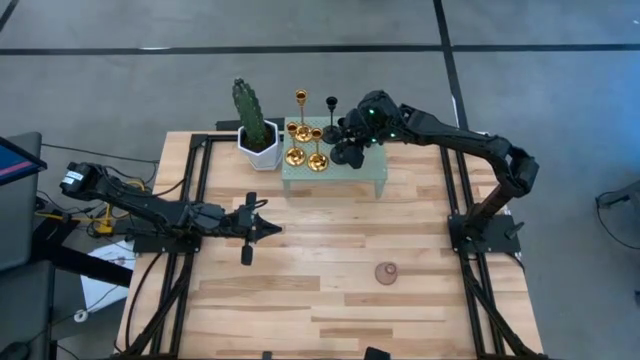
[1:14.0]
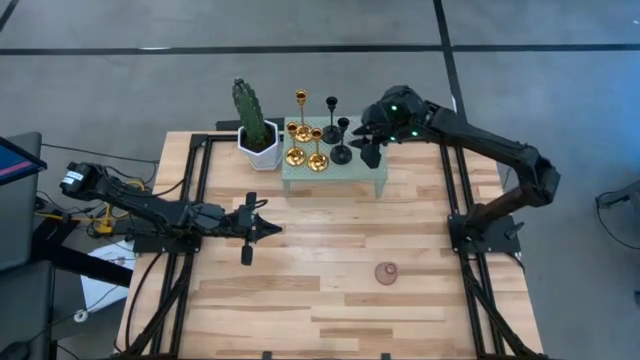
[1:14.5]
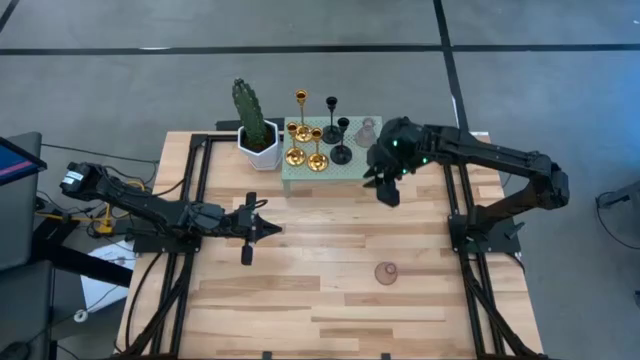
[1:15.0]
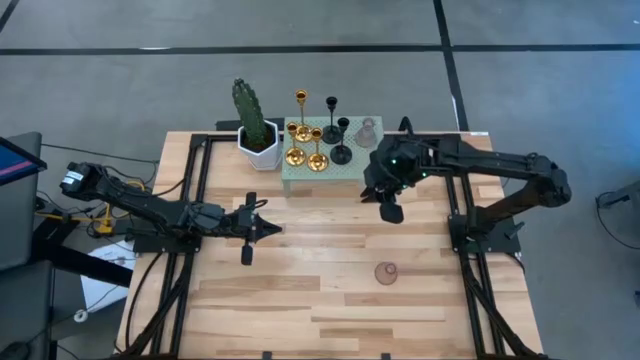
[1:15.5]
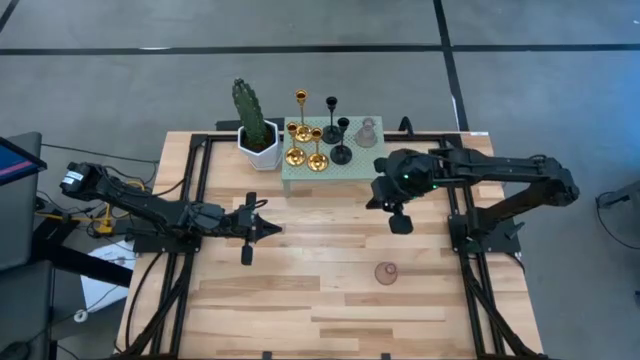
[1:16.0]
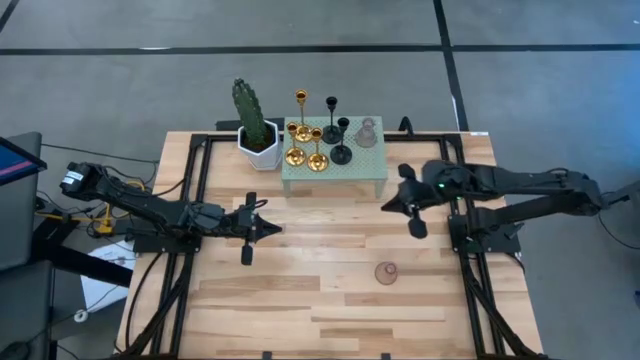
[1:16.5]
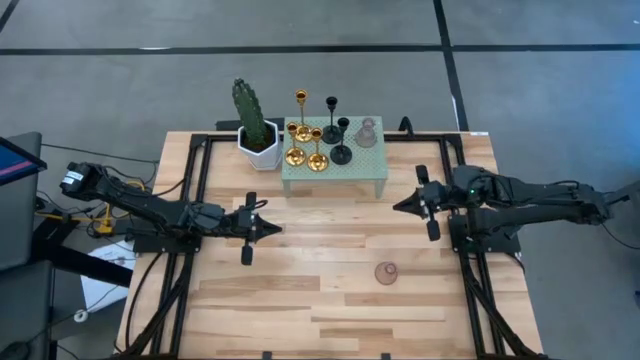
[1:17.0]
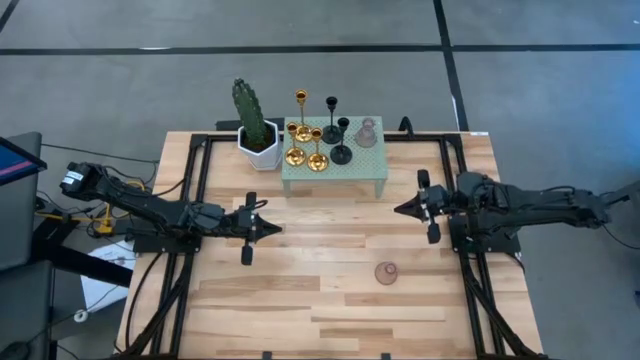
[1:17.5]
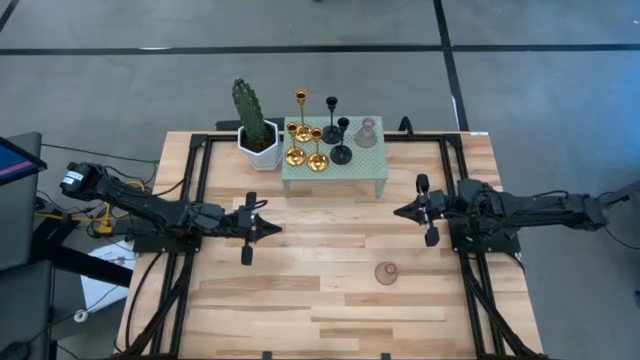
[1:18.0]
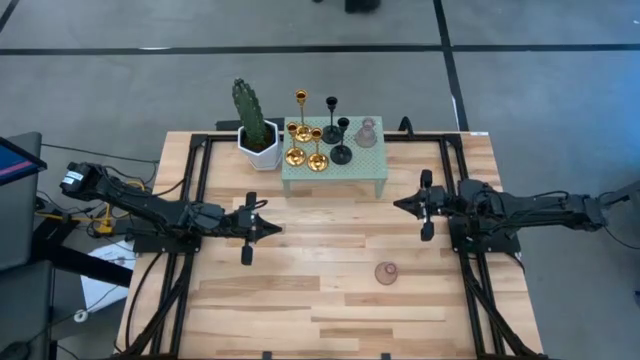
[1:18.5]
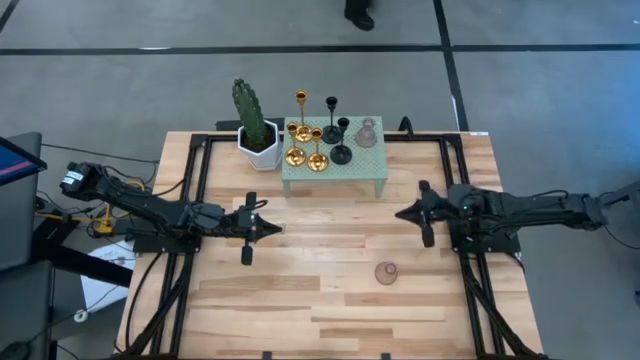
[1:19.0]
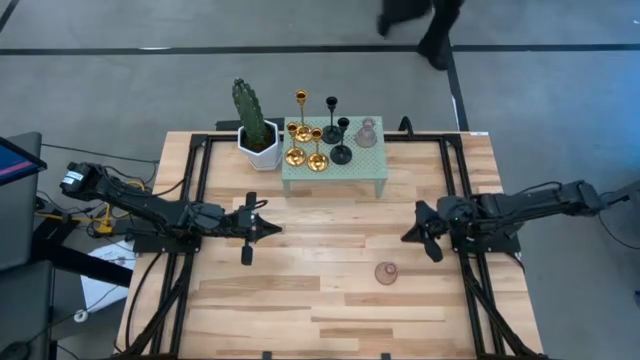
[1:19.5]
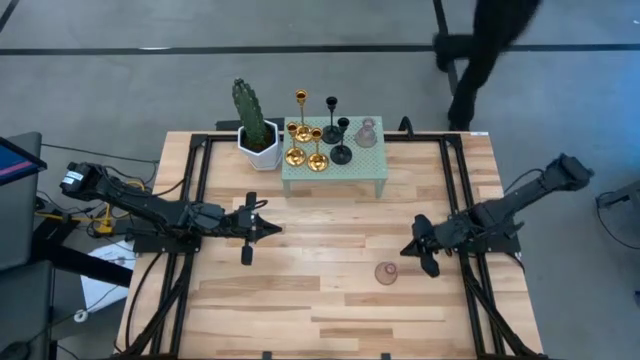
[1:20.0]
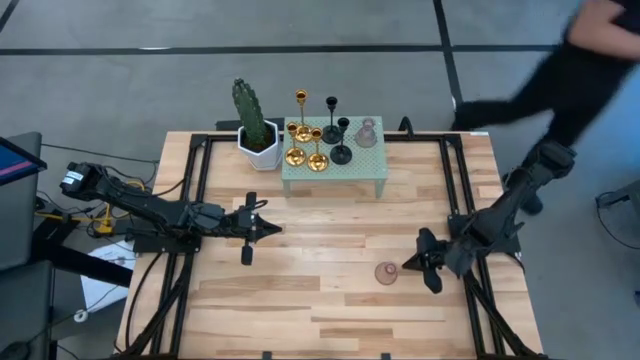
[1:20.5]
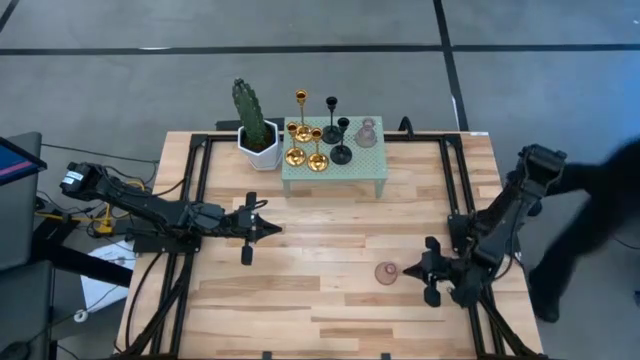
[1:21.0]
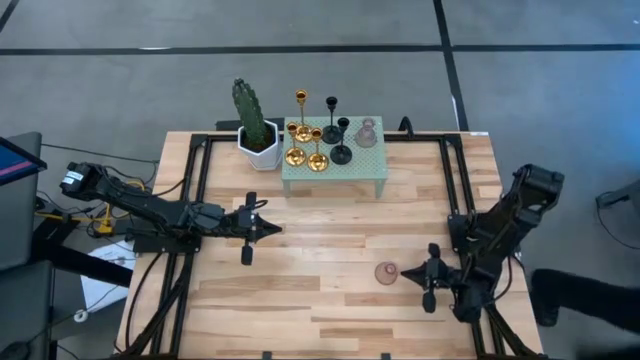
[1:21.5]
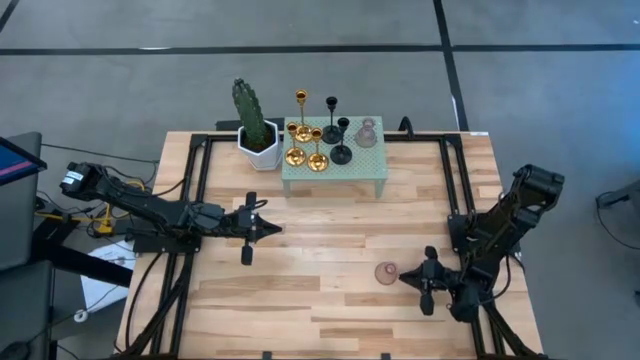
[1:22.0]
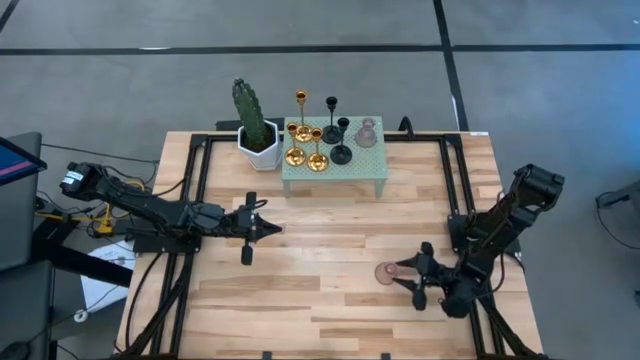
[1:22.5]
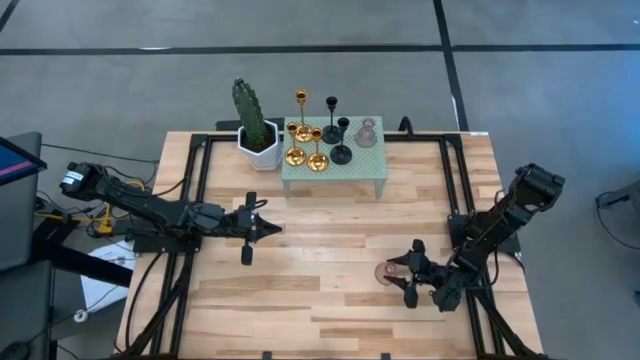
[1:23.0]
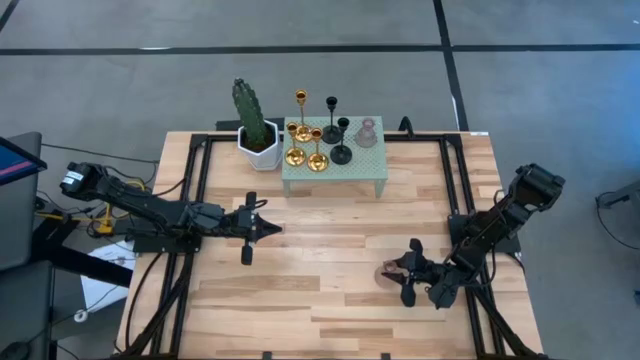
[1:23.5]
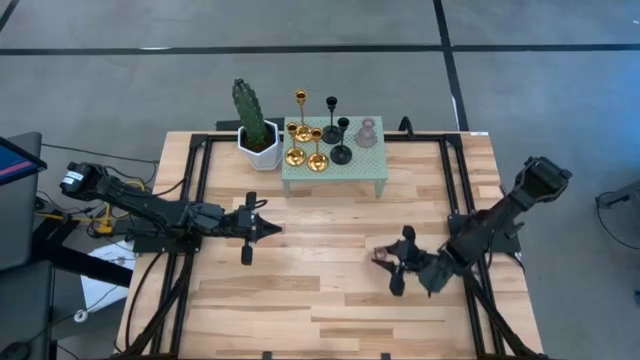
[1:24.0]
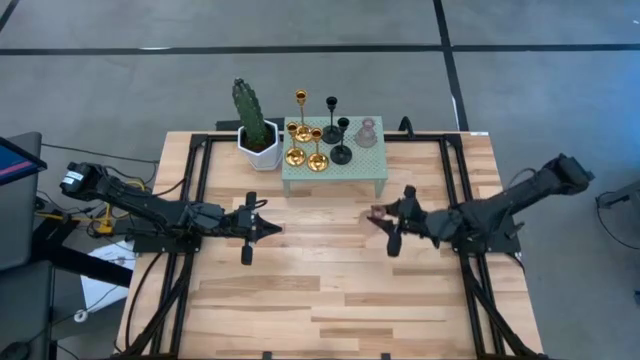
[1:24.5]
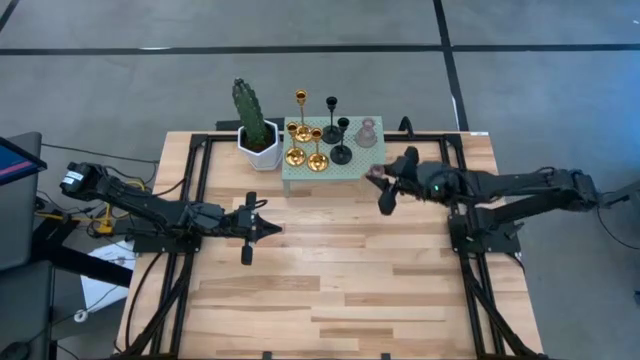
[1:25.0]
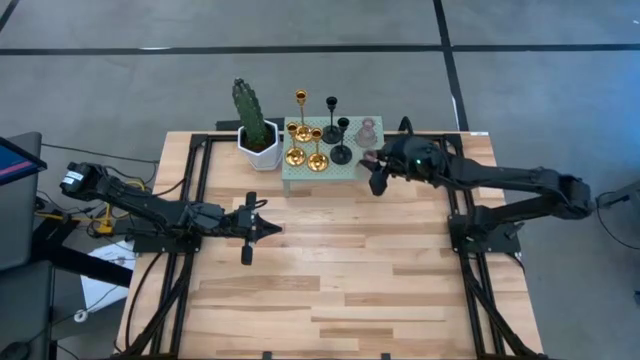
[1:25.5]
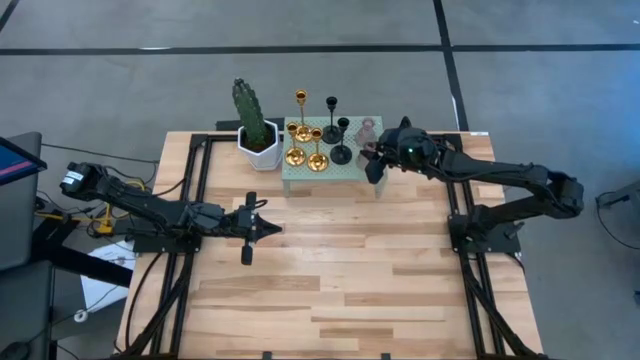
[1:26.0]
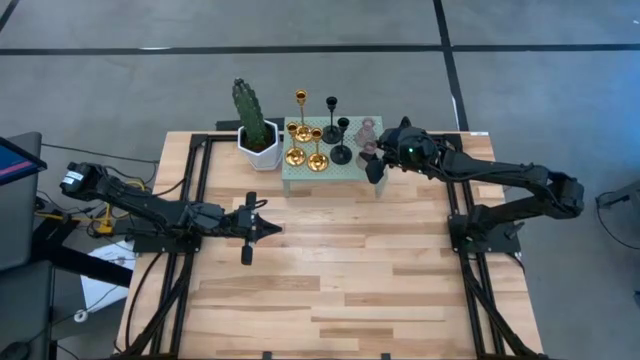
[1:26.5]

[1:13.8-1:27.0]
Task: Pick & Place candle stick holders
Put the pink glass candle holder on the shelf

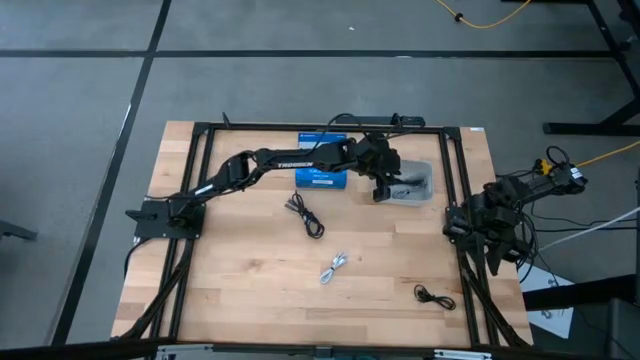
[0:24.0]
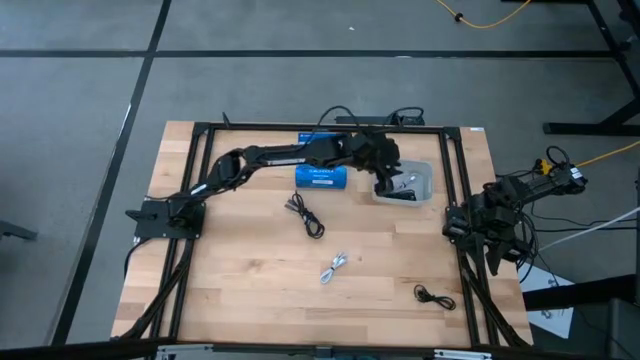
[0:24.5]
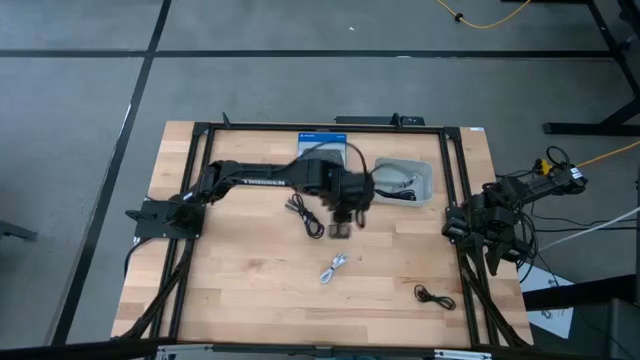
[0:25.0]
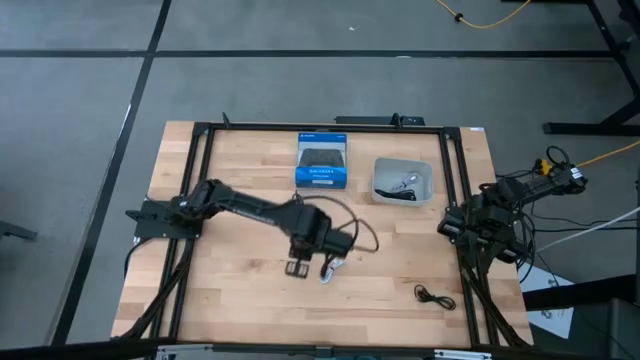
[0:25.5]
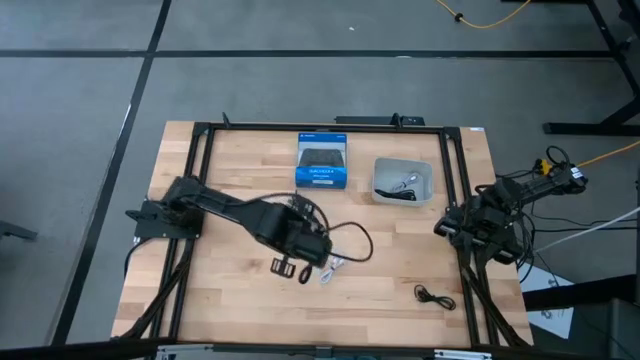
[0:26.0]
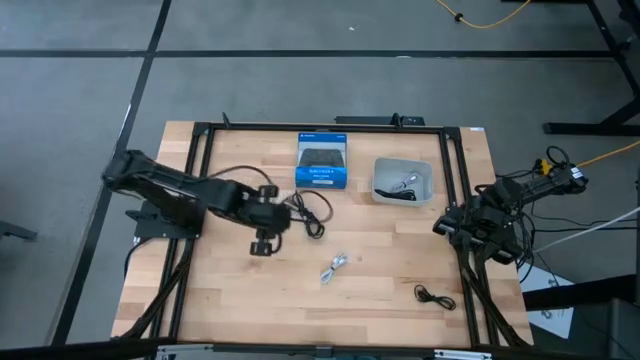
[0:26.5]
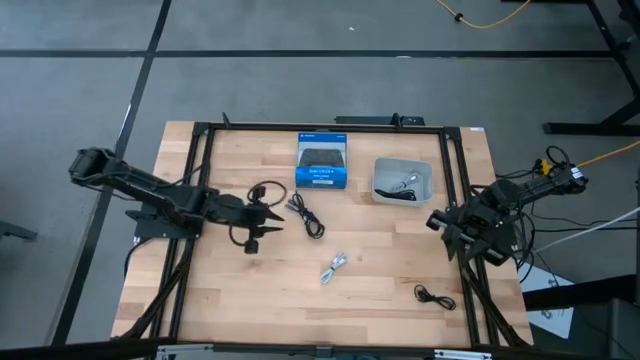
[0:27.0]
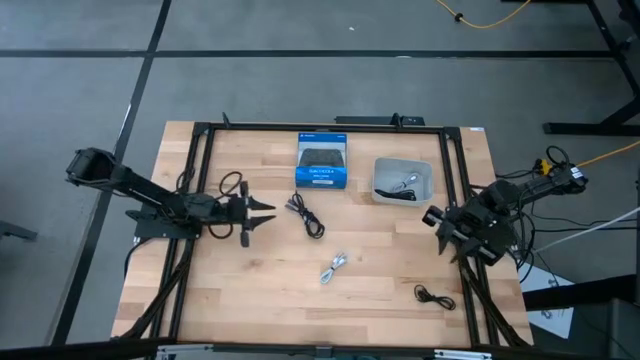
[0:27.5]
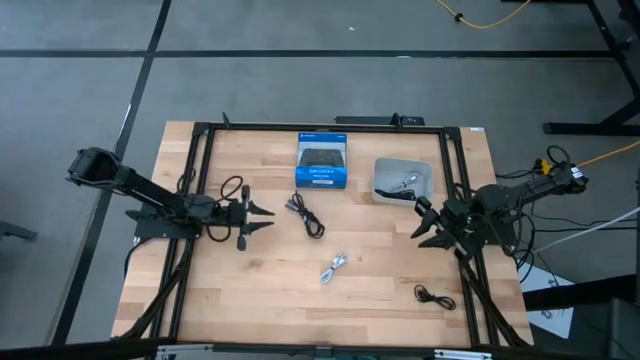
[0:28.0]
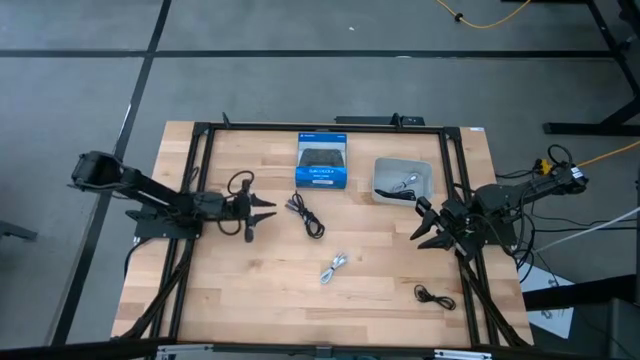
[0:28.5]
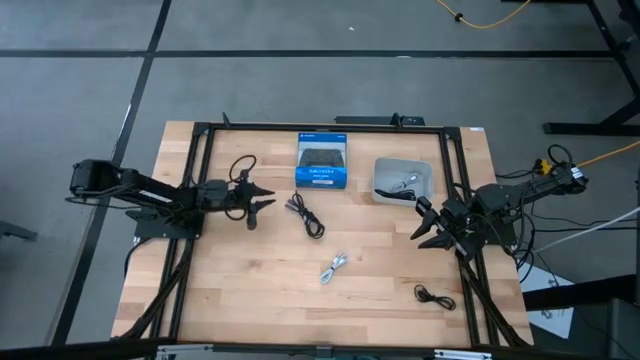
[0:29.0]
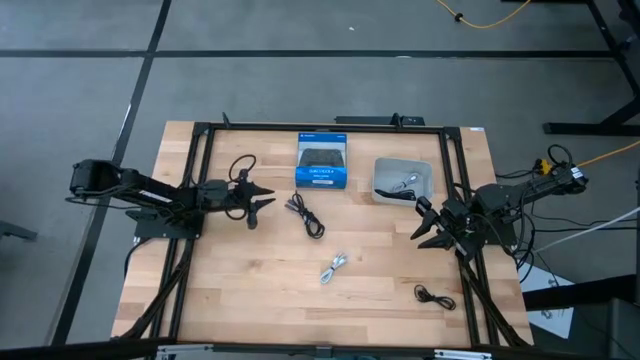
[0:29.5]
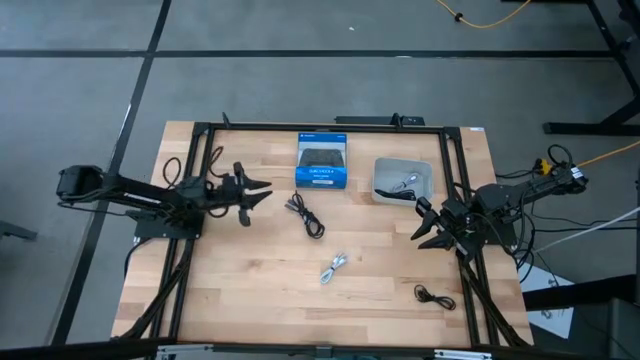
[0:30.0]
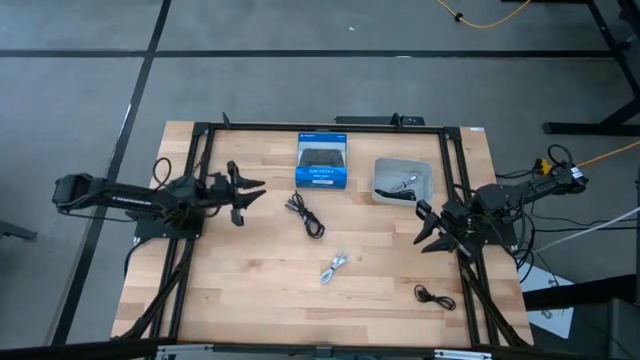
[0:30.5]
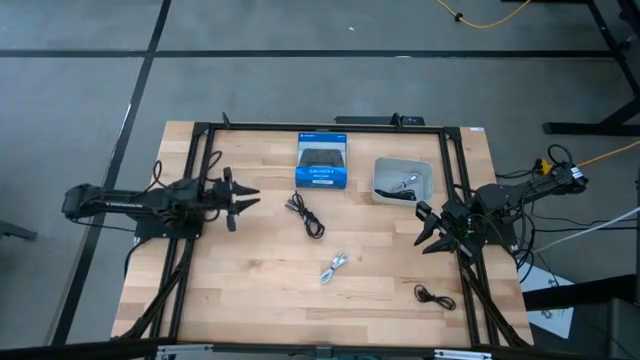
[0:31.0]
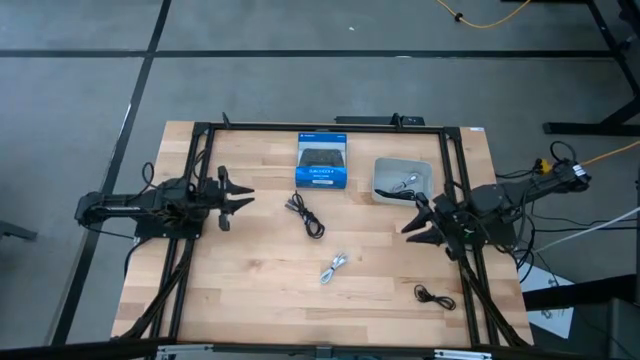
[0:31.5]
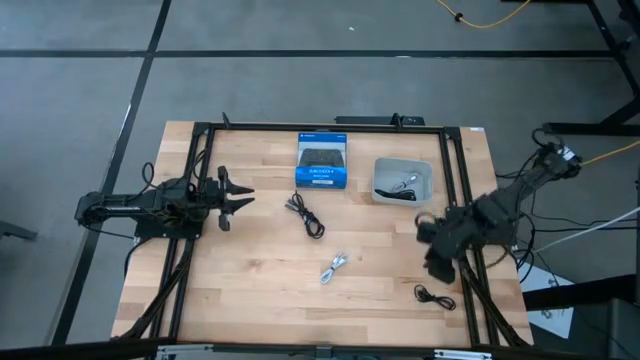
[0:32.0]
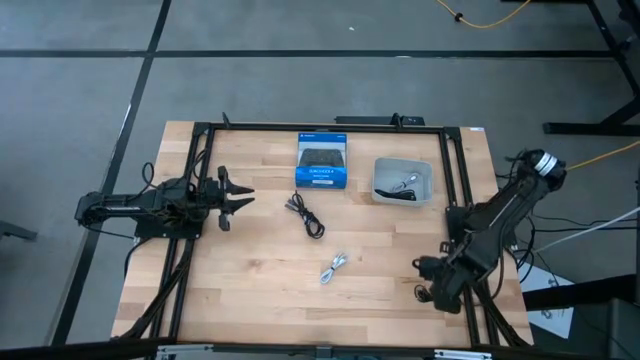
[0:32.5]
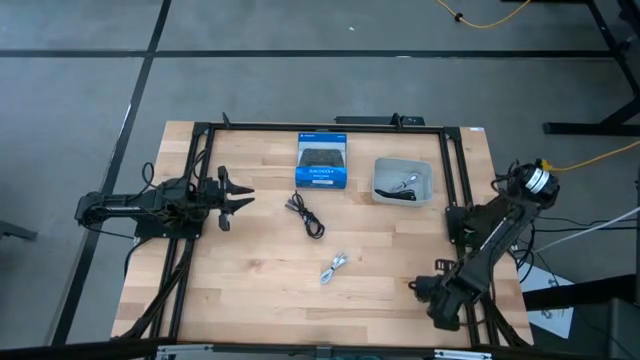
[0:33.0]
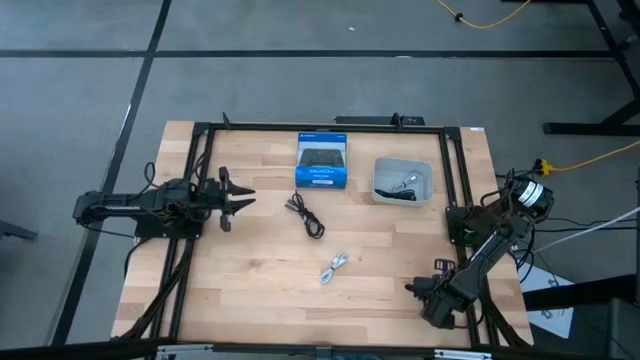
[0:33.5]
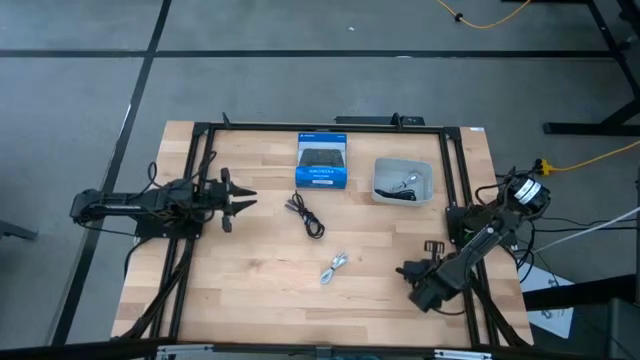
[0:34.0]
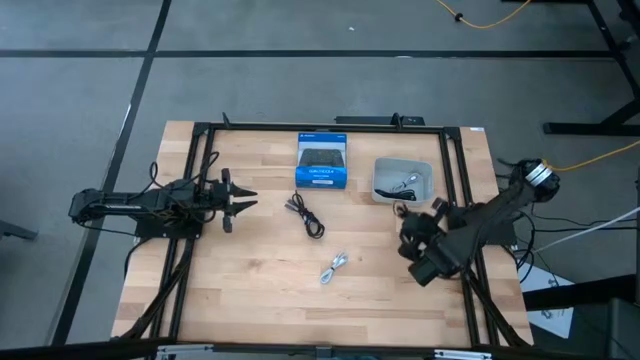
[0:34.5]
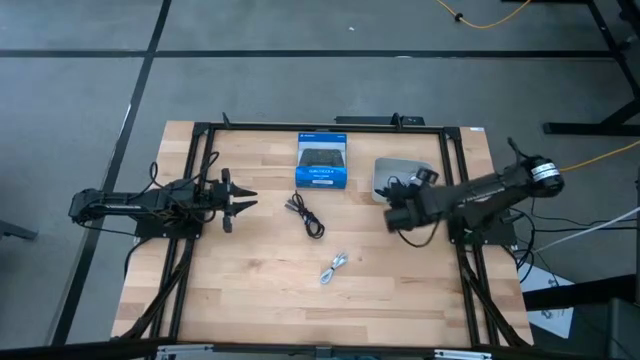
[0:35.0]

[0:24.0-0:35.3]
Task: Pick and place USB-C Cables
Put the bottom black charger cable into the gray bin
